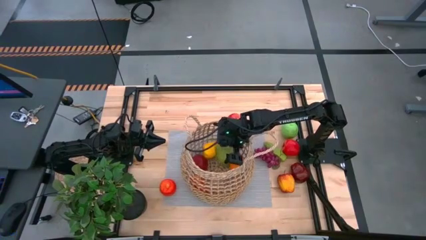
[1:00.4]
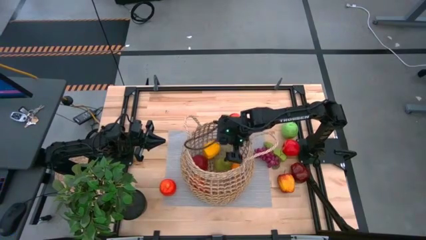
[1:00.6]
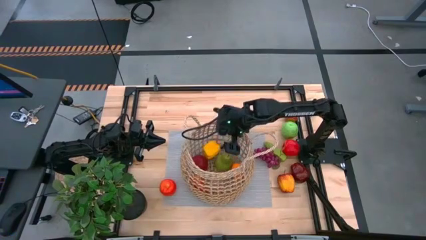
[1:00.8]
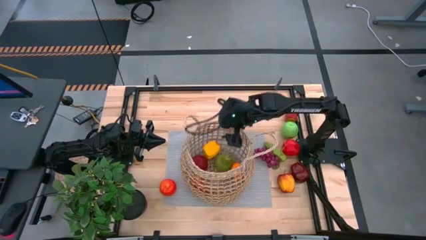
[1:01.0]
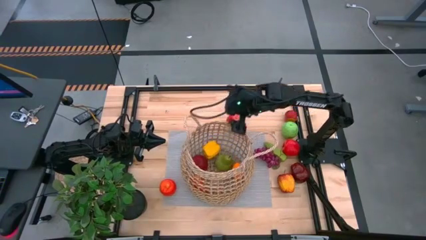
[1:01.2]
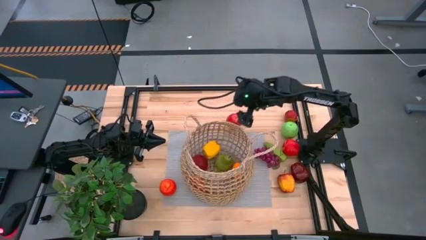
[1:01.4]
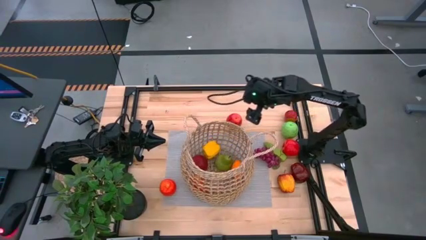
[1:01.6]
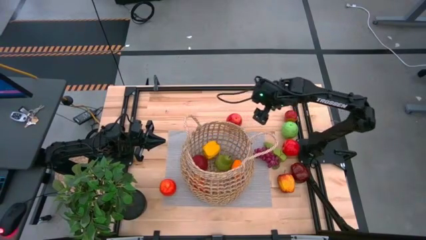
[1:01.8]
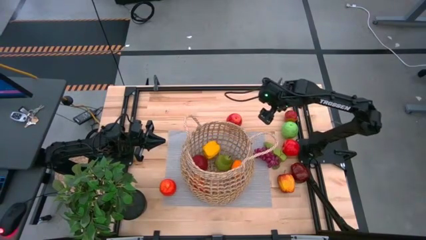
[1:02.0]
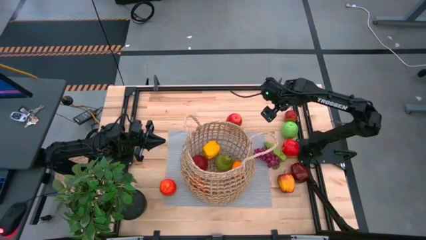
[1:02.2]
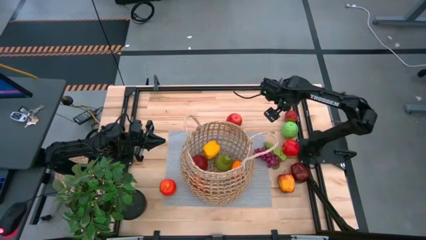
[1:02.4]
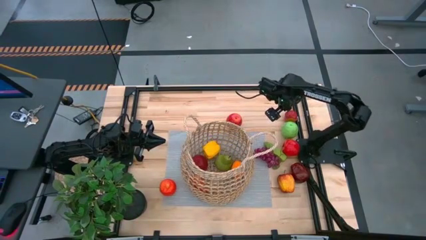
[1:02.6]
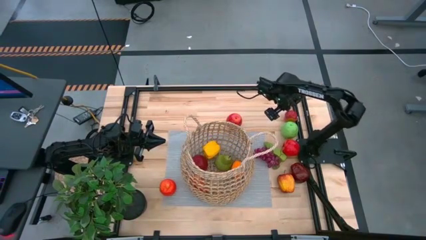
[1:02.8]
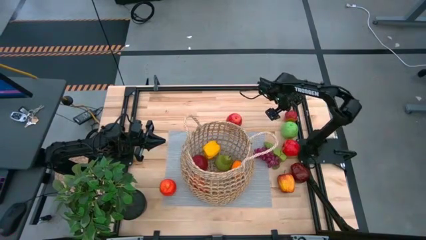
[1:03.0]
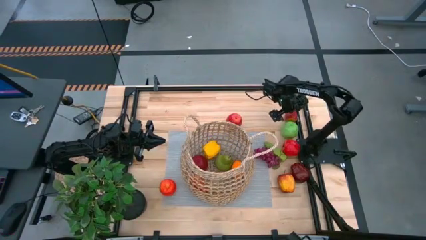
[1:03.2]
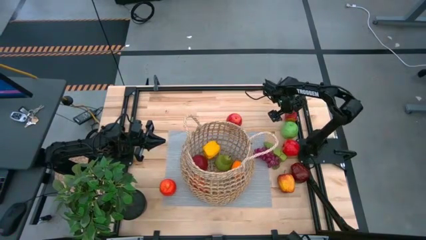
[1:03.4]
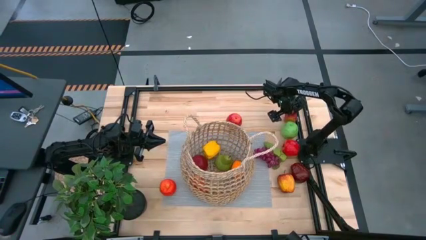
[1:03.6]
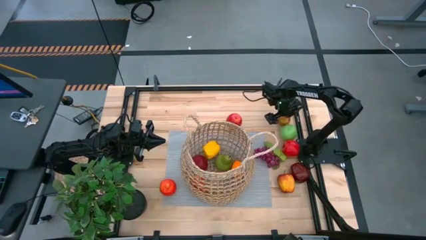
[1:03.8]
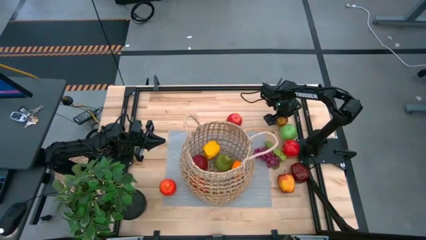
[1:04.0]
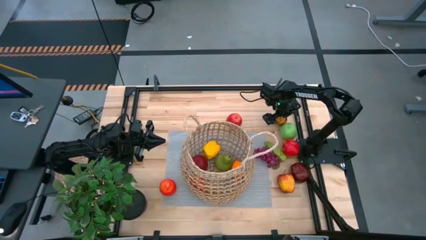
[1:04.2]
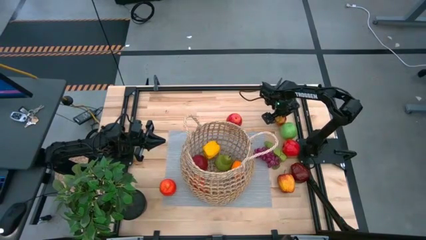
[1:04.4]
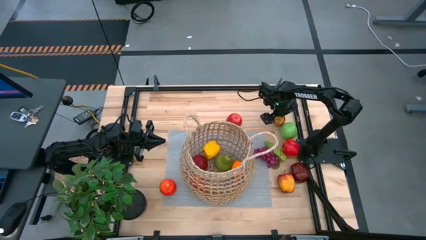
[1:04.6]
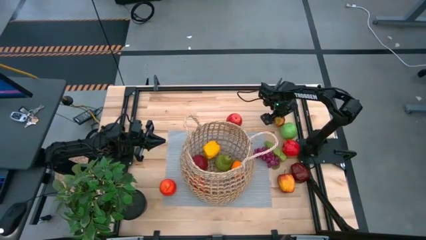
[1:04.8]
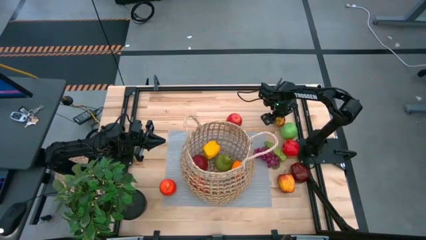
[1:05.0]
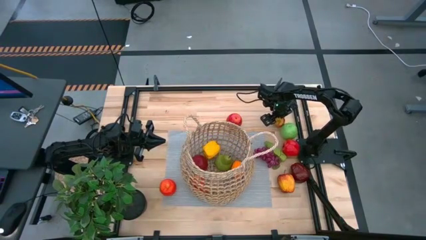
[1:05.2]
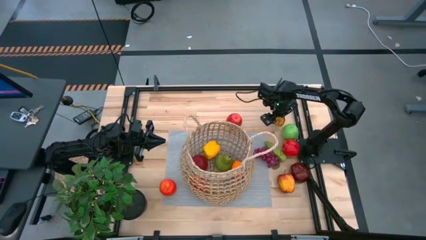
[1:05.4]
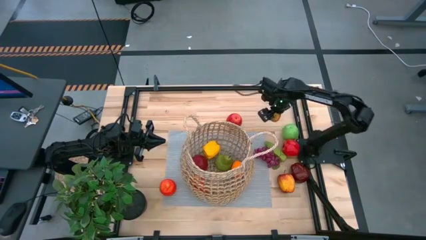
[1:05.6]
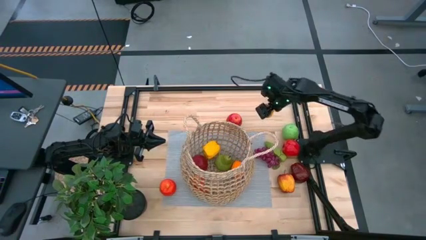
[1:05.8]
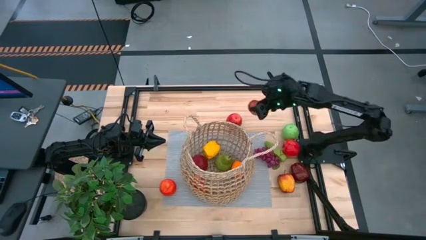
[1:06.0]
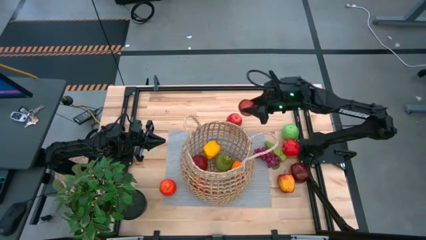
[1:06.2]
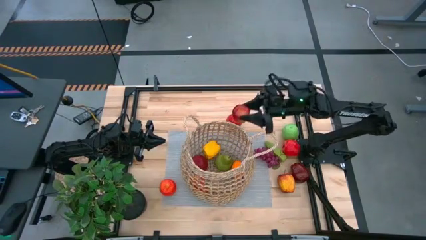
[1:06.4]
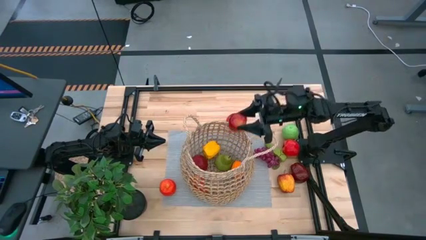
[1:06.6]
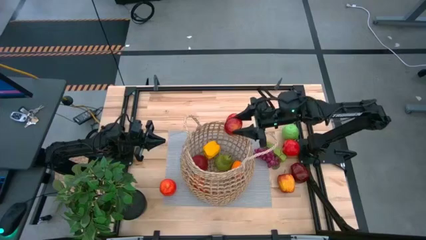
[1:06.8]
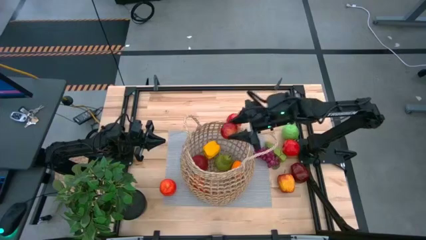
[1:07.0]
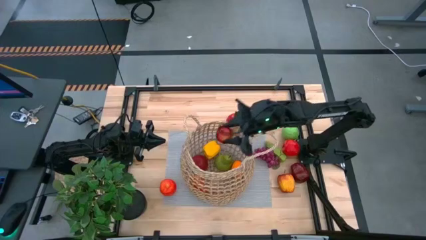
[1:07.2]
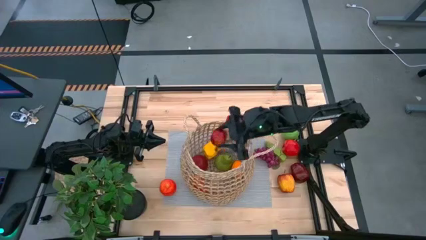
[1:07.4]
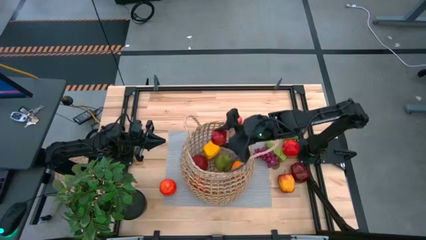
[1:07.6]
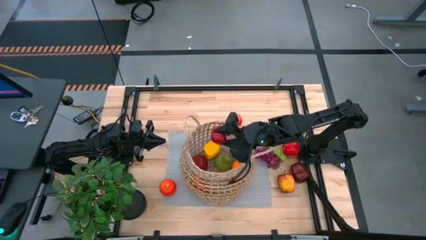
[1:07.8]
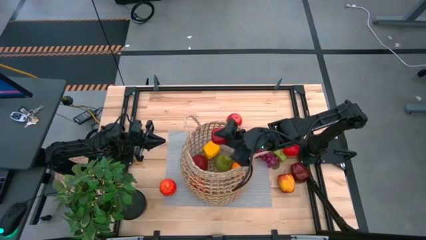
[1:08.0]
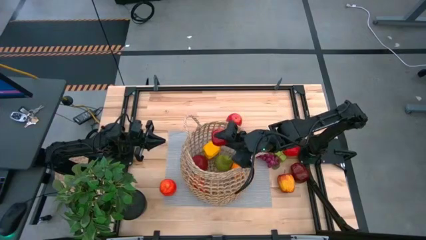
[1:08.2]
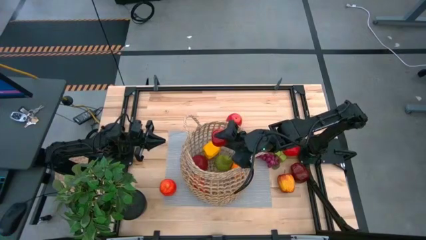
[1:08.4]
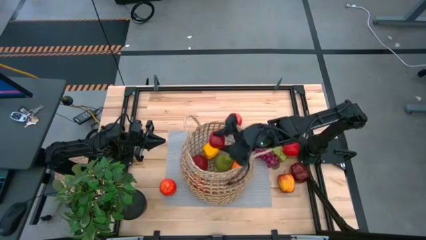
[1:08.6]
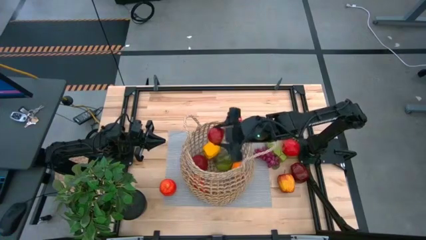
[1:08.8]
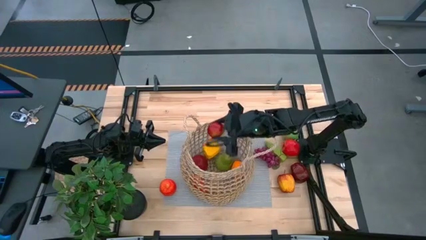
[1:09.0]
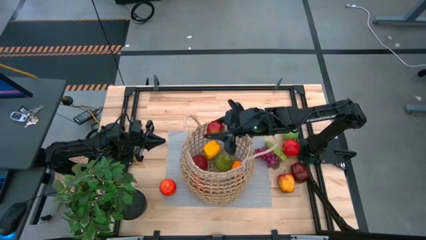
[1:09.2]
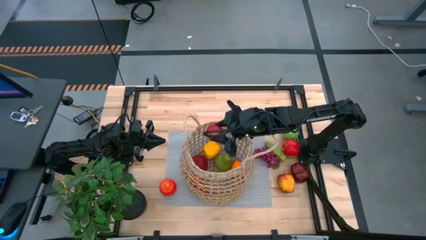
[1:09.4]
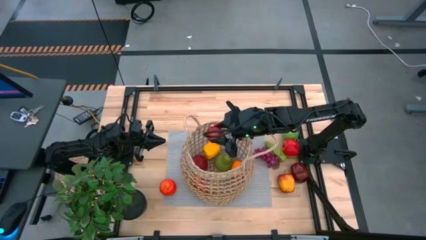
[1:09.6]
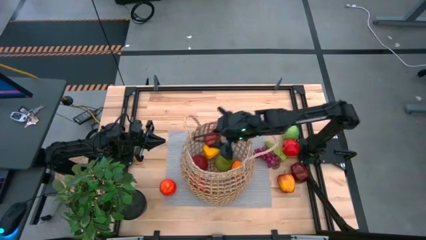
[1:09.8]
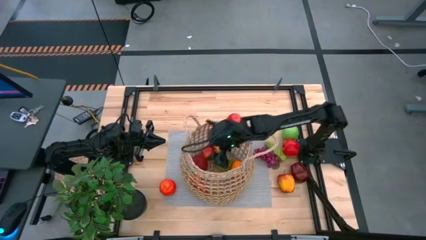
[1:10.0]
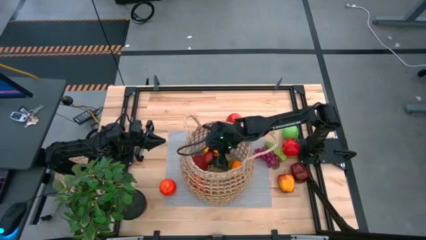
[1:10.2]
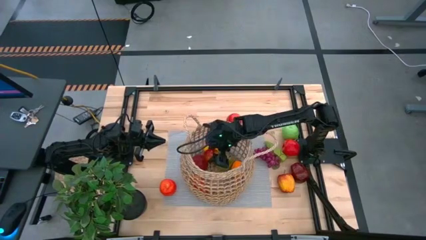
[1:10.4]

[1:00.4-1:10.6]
Task: Build produce basket
Put the red apple into the brown basket

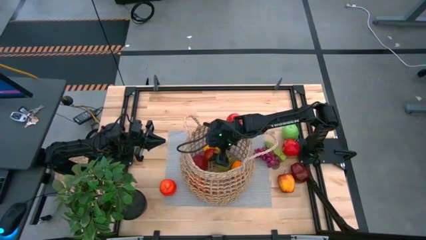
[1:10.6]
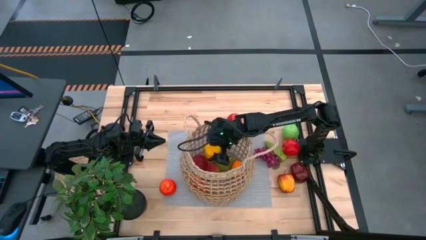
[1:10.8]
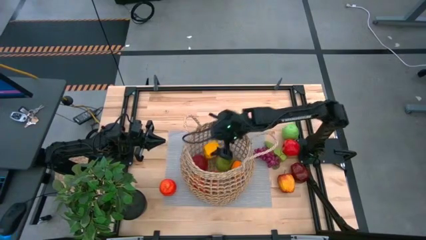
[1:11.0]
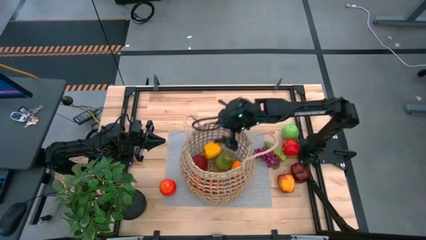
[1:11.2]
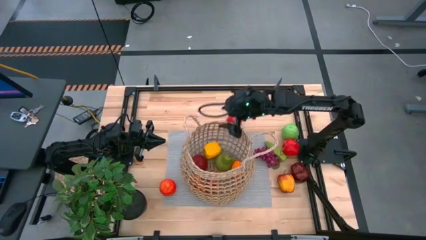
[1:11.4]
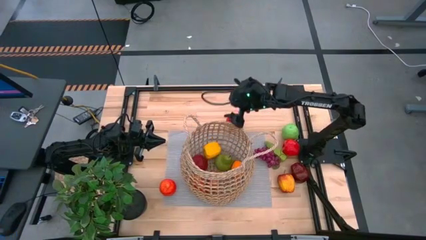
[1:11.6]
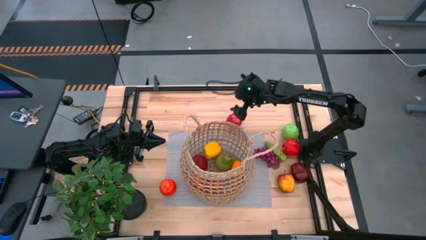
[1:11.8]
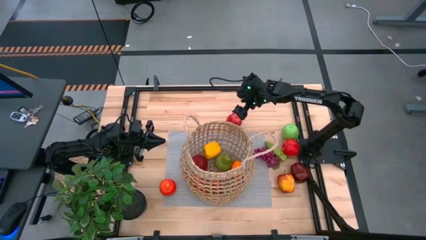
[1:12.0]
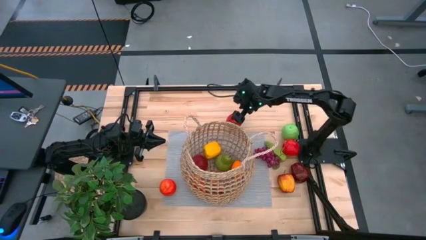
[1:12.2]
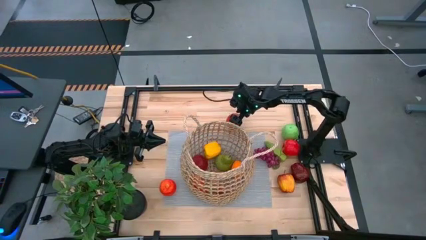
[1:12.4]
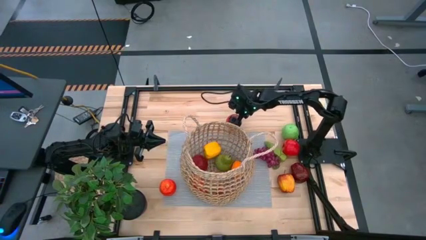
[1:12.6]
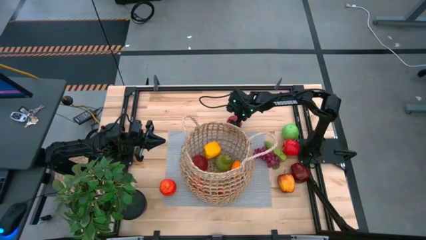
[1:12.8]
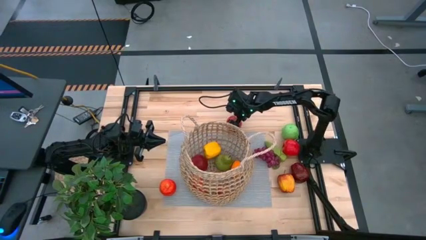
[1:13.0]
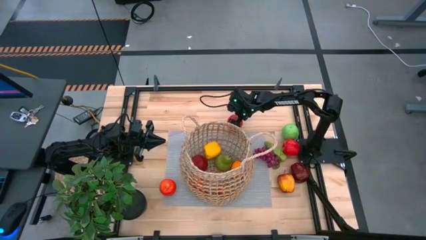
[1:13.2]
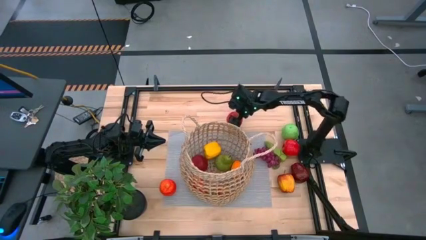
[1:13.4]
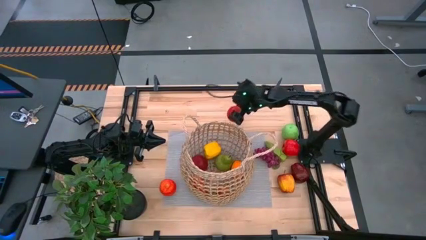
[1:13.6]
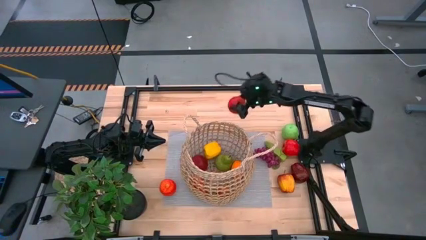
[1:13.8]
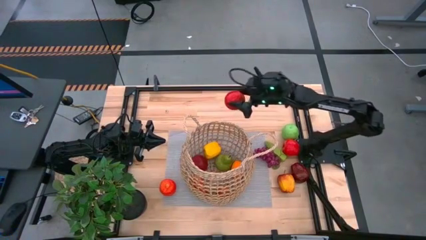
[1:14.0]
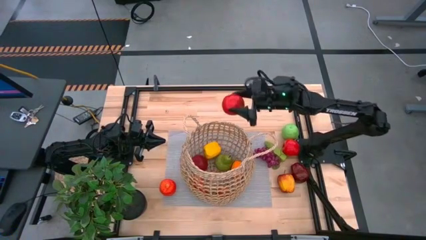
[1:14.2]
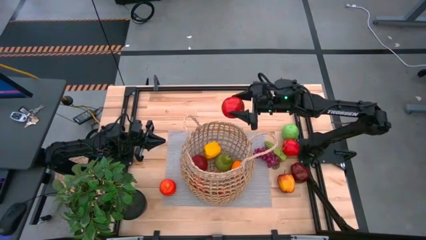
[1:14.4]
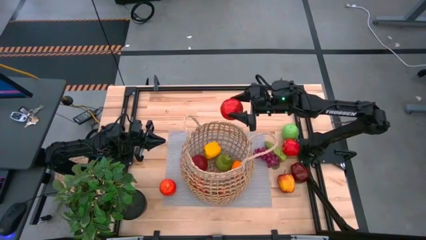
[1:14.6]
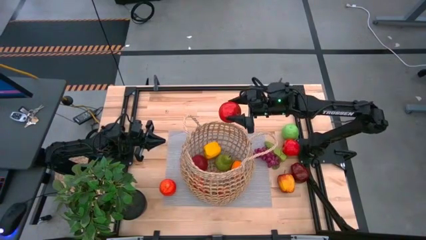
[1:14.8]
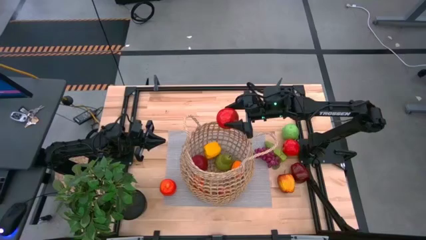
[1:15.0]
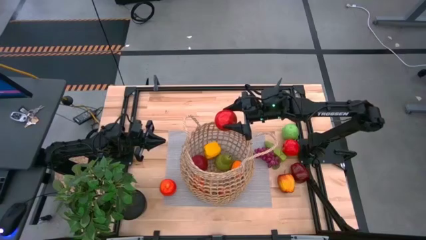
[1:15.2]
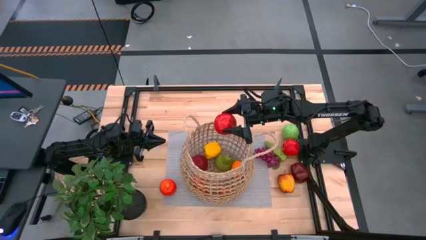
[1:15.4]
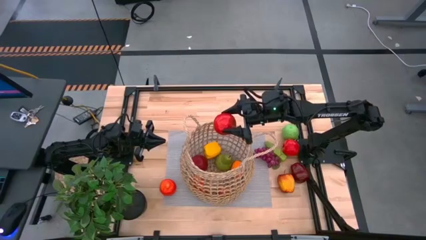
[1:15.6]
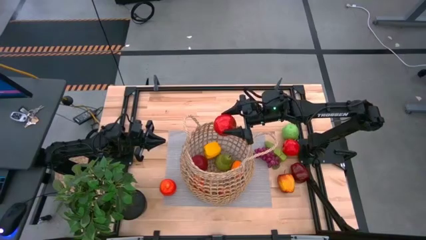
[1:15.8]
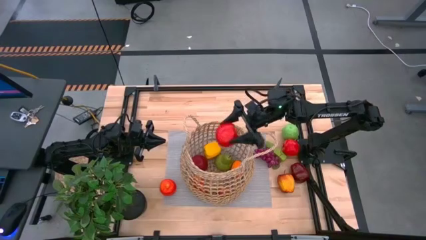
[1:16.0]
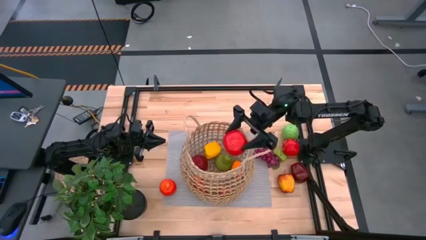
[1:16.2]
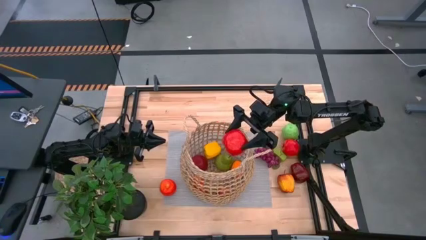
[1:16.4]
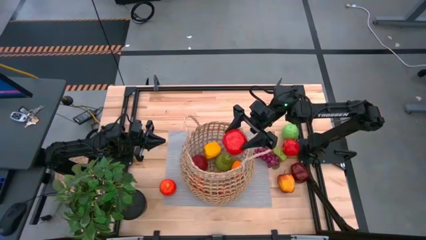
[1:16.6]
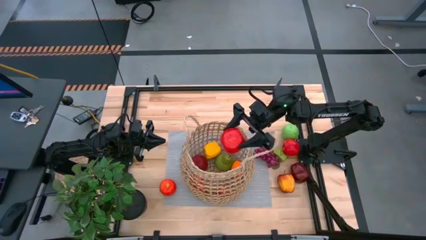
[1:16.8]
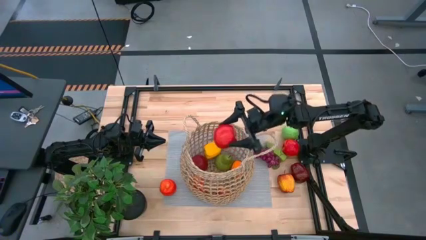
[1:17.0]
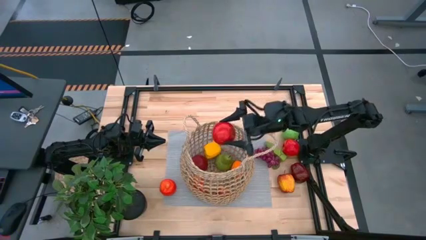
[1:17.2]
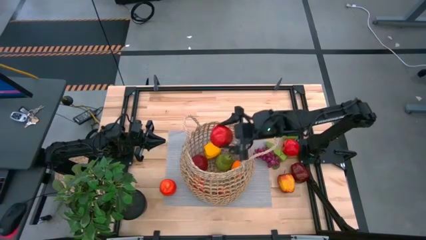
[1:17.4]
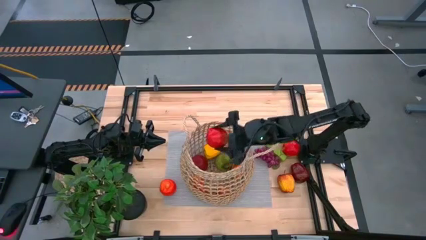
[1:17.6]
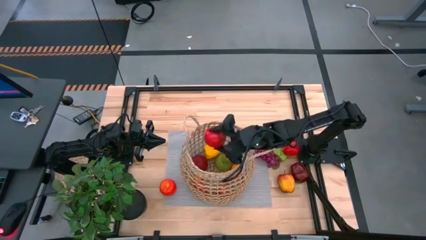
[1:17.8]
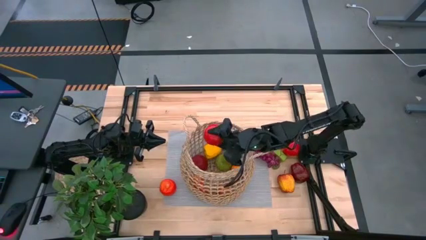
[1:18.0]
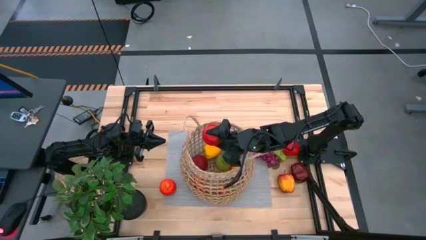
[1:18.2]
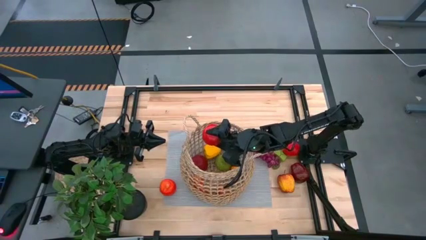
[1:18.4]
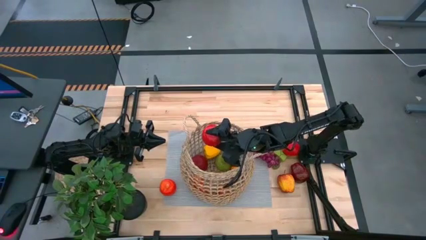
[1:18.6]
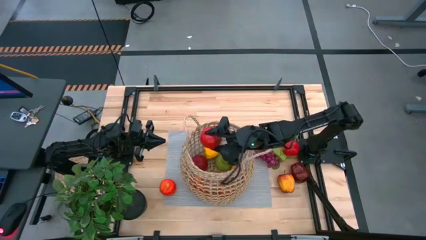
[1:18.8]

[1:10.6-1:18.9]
Put the red apple into the brown basket
